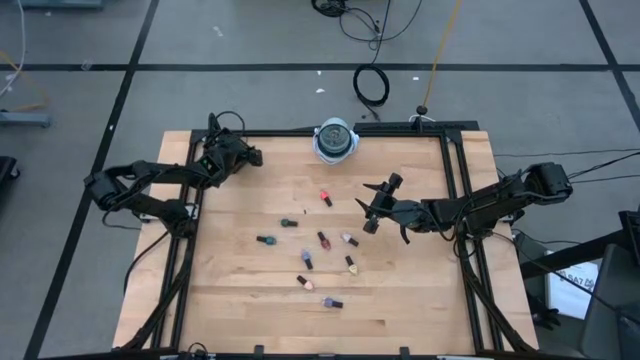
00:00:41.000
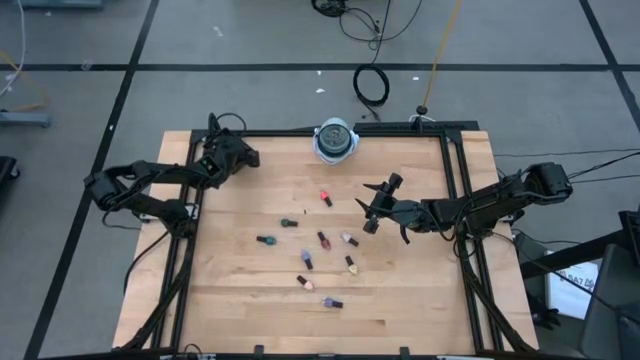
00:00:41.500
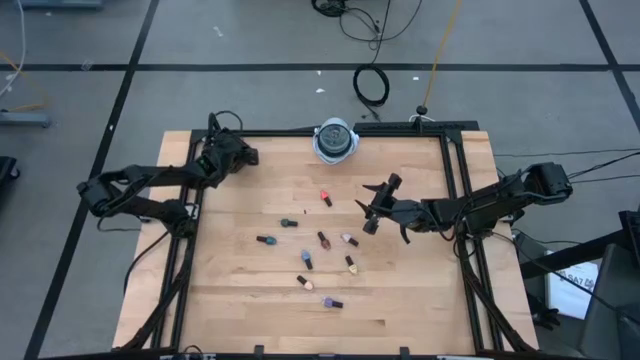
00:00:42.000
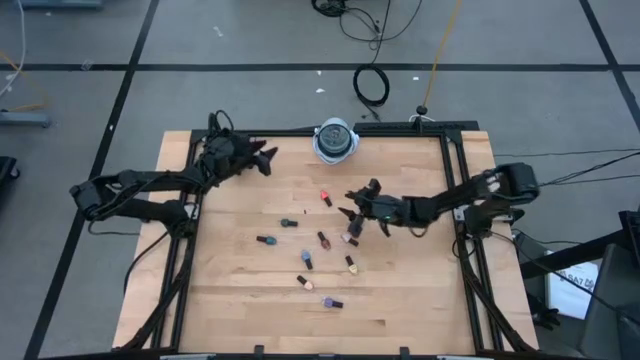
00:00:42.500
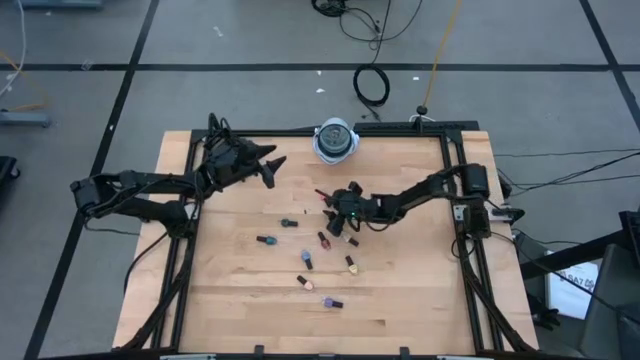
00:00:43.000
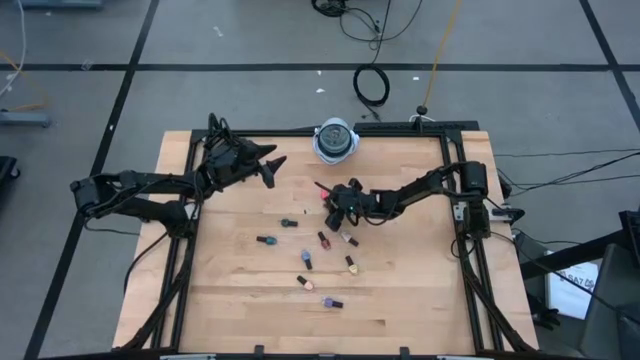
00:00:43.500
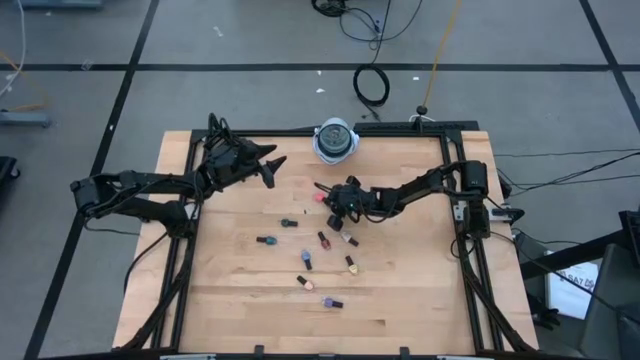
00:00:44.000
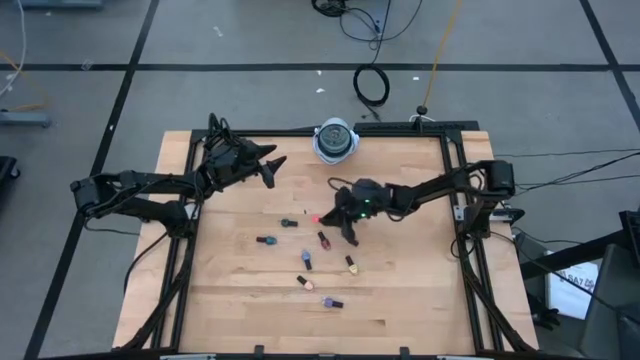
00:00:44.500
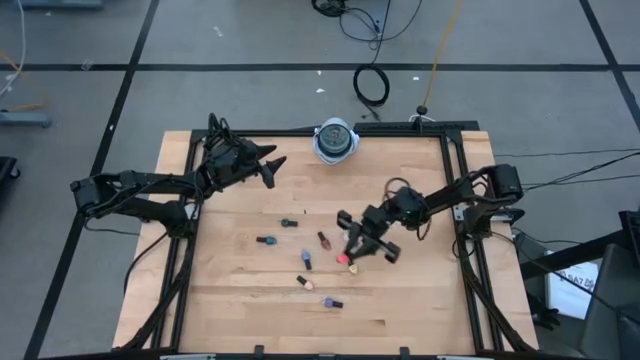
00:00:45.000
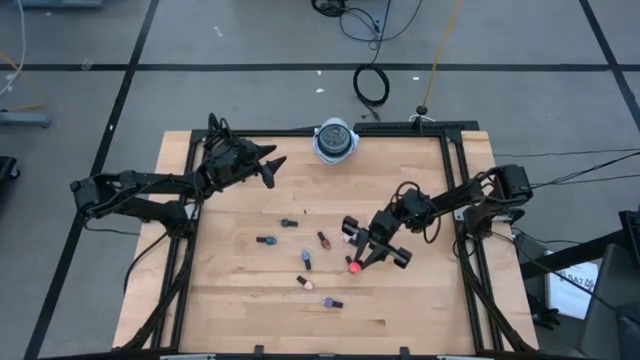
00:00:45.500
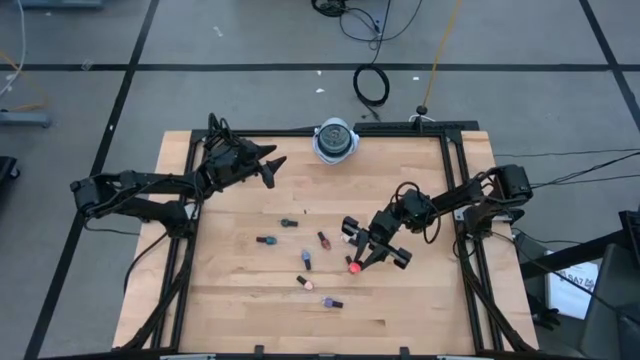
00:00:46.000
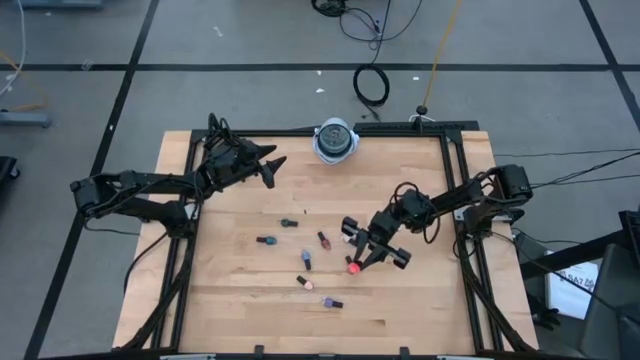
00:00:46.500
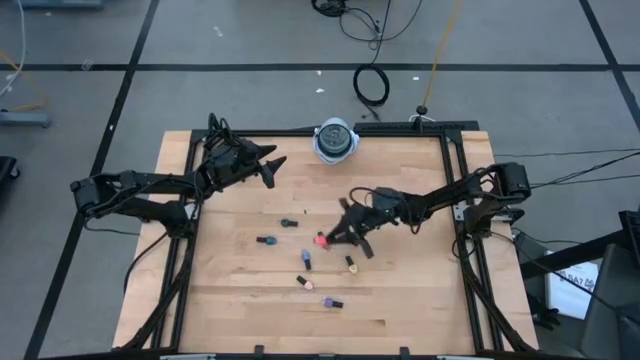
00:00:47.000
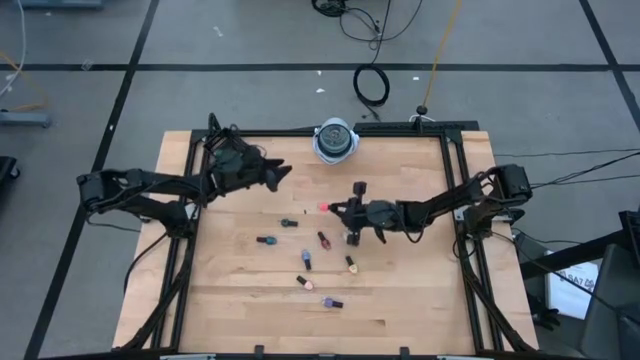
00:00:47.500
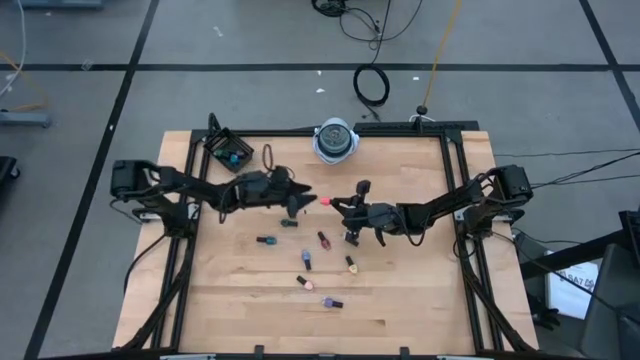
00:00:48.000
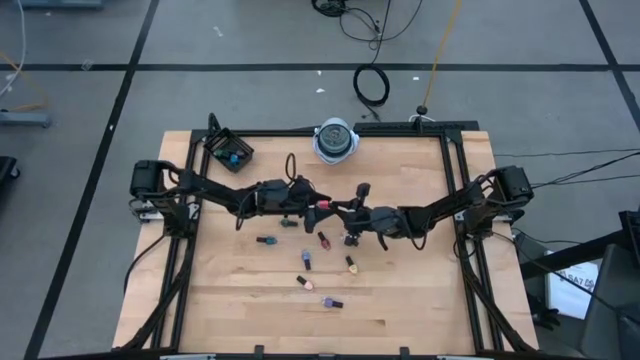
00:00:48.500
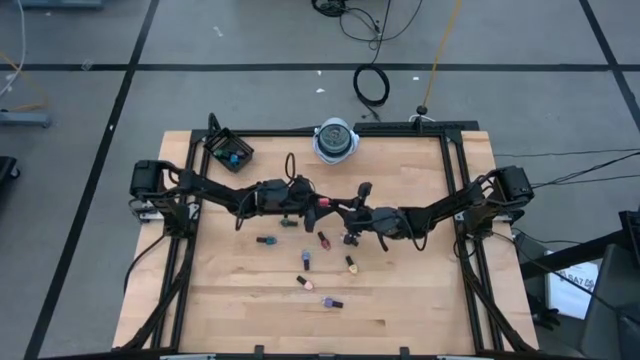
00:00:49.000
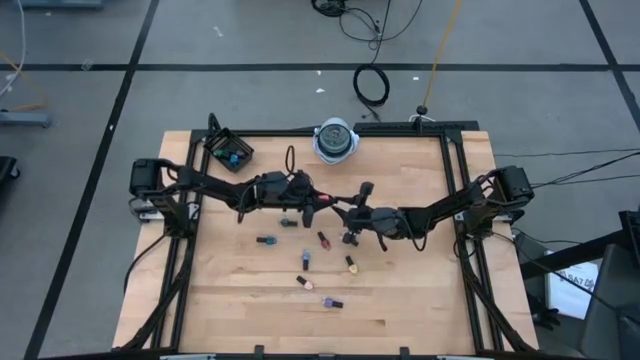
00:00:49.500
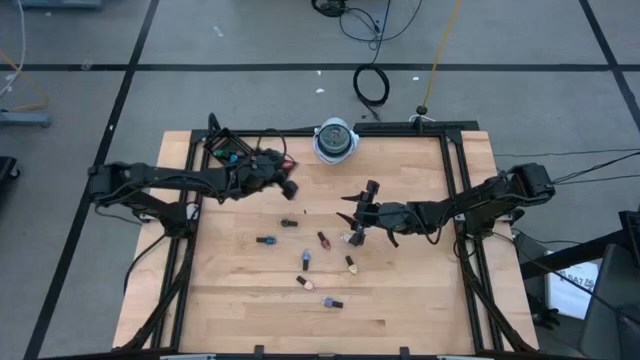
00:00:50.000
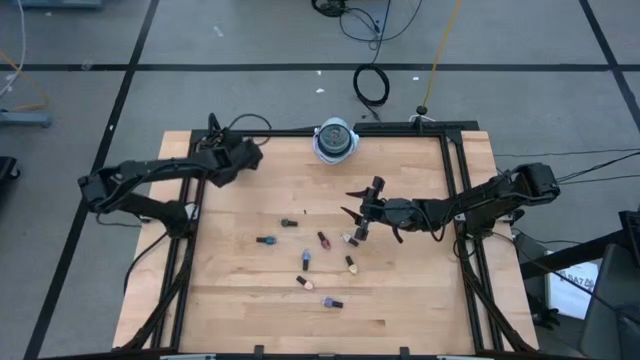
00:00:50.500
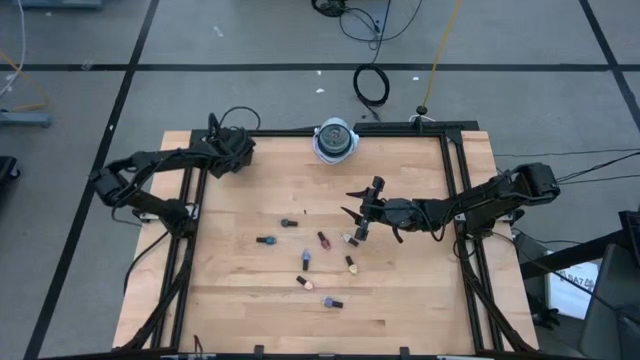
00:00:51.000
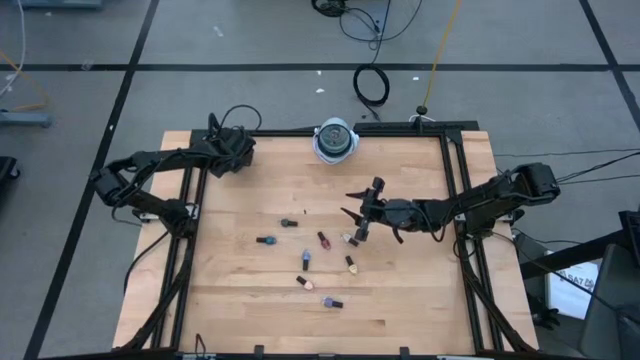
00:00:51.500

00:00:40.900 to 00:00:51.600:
Task: Pick & Place Nail Polish
Put the pink nail polish bottle into the black bin

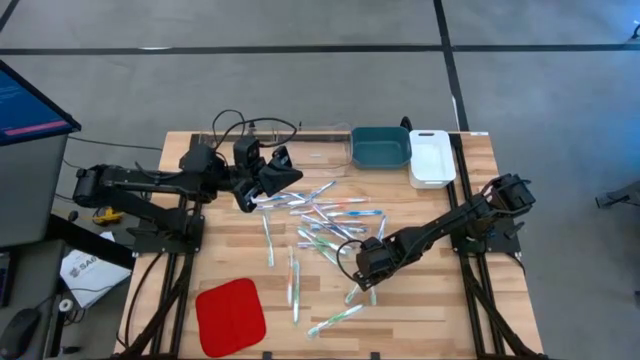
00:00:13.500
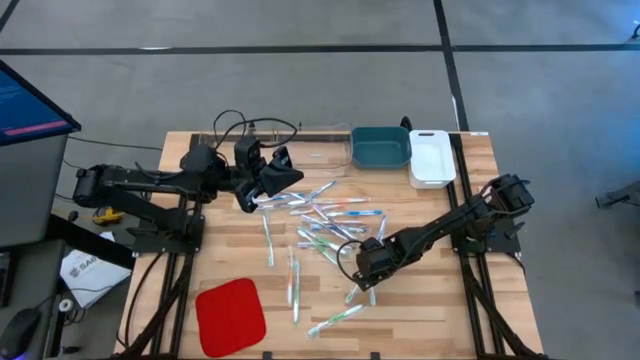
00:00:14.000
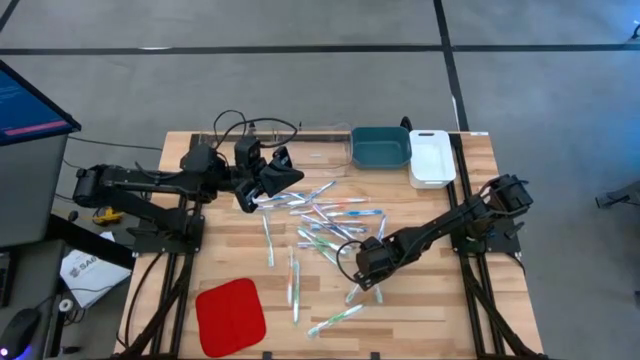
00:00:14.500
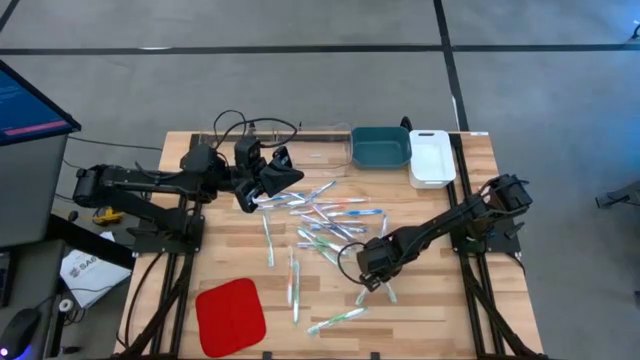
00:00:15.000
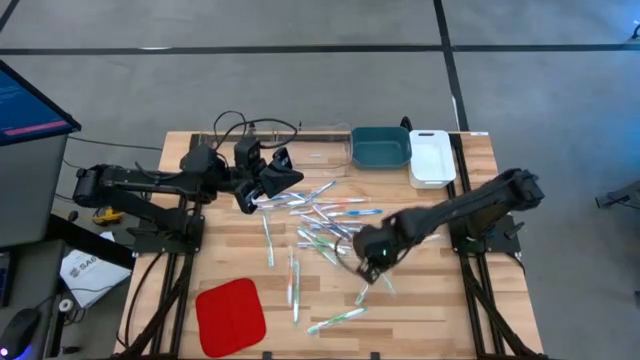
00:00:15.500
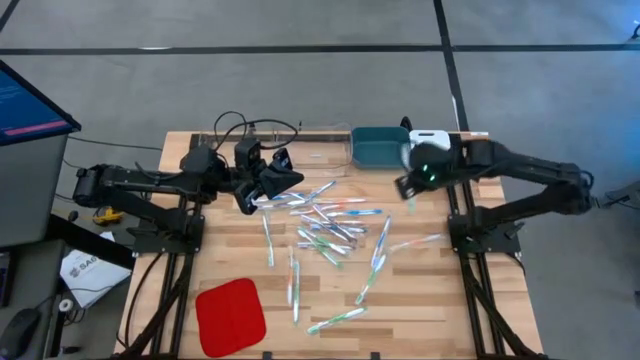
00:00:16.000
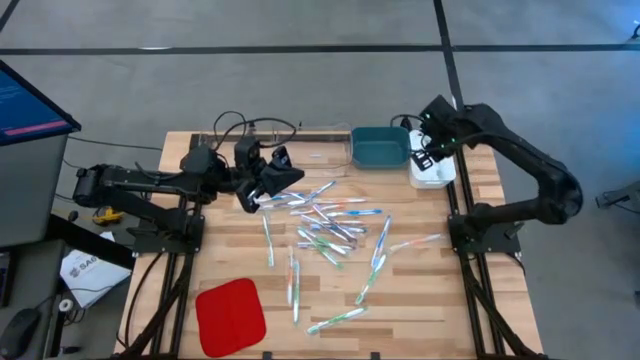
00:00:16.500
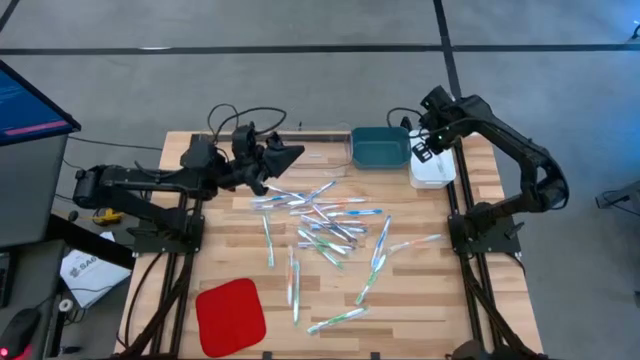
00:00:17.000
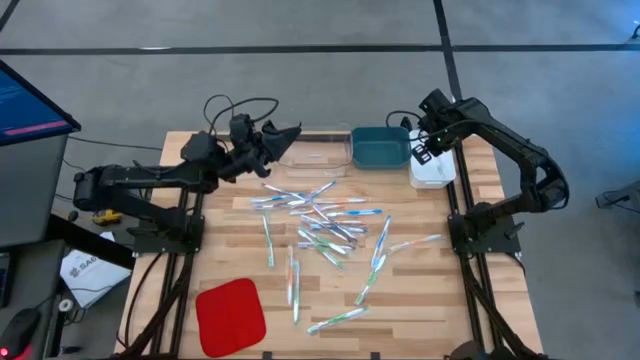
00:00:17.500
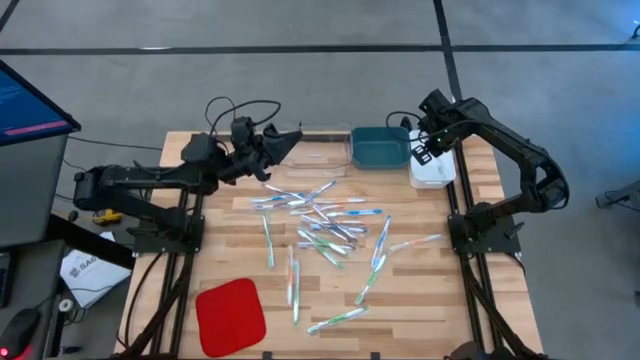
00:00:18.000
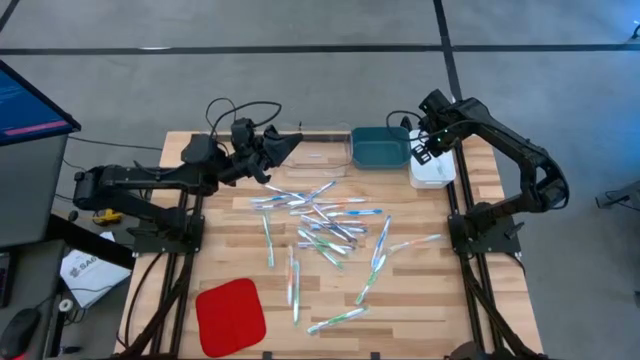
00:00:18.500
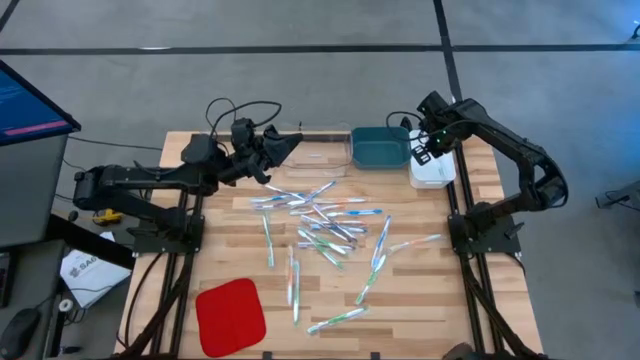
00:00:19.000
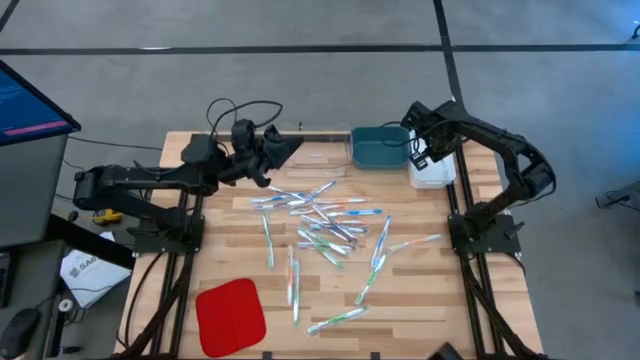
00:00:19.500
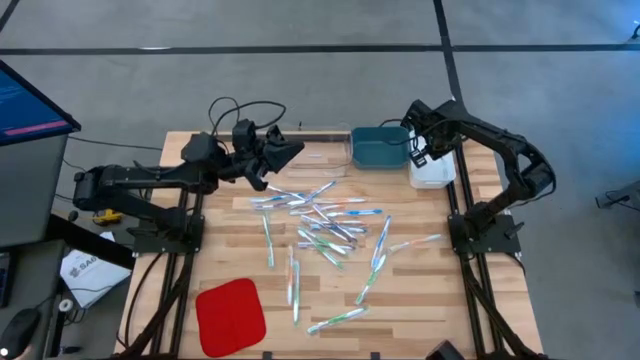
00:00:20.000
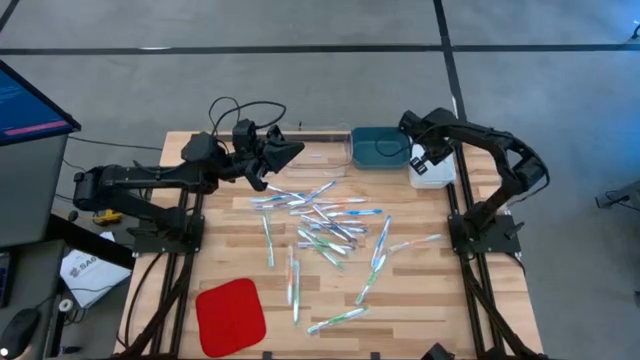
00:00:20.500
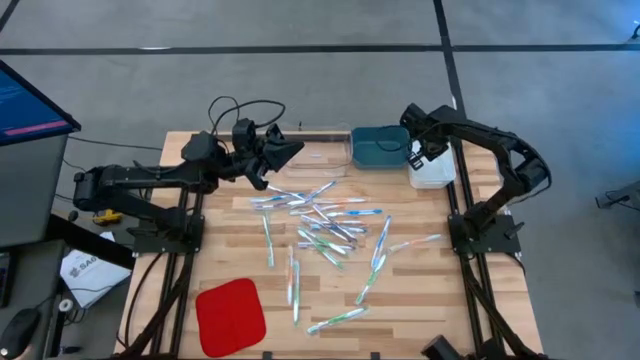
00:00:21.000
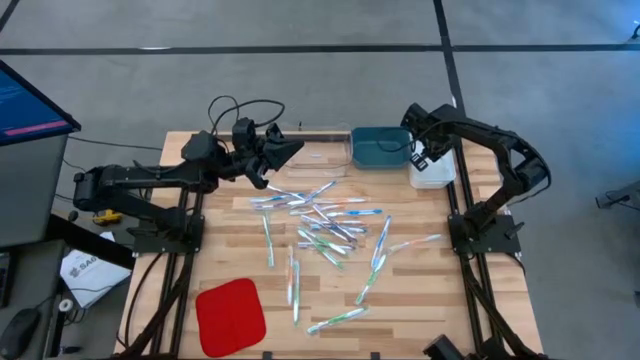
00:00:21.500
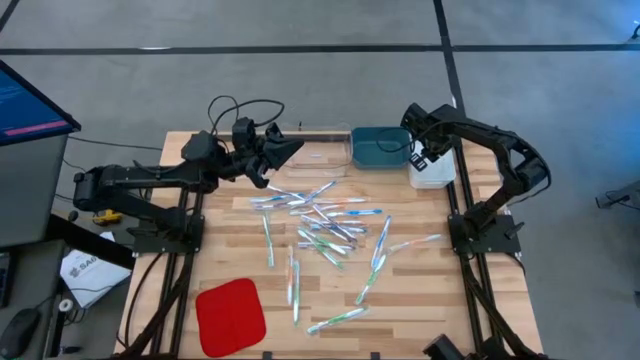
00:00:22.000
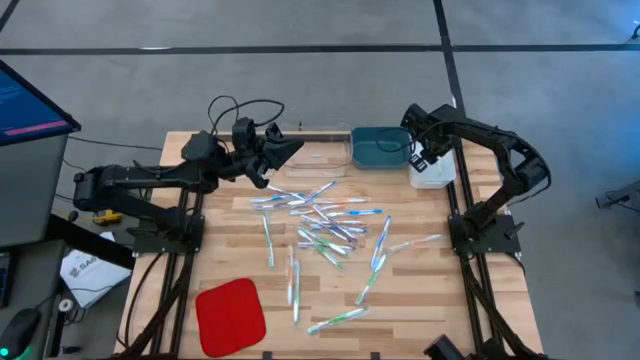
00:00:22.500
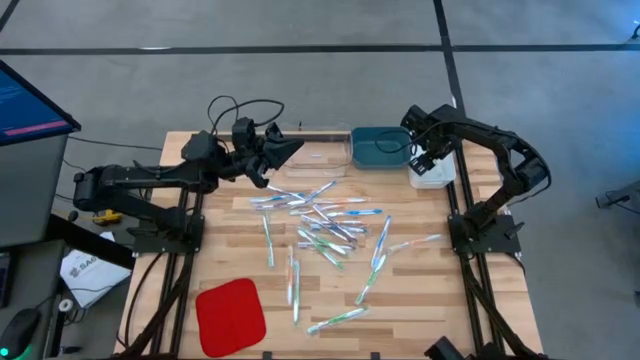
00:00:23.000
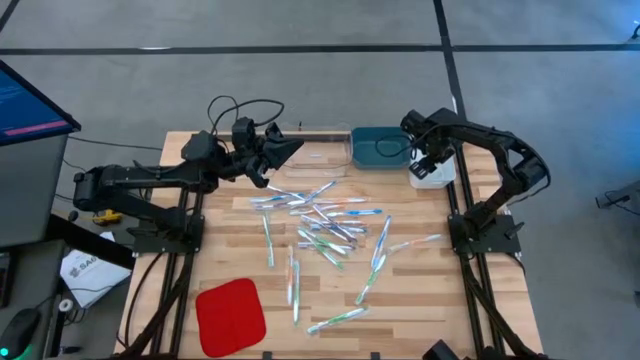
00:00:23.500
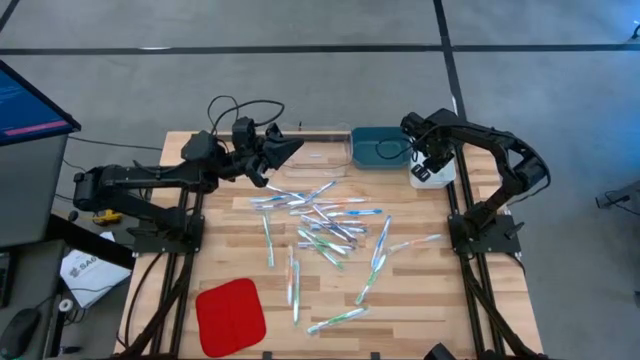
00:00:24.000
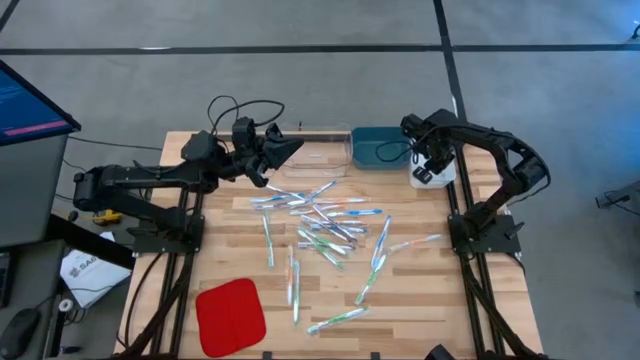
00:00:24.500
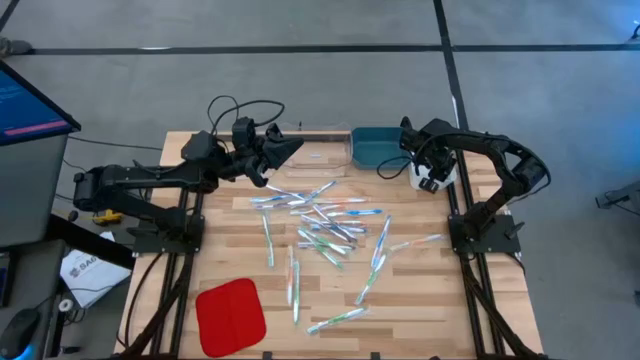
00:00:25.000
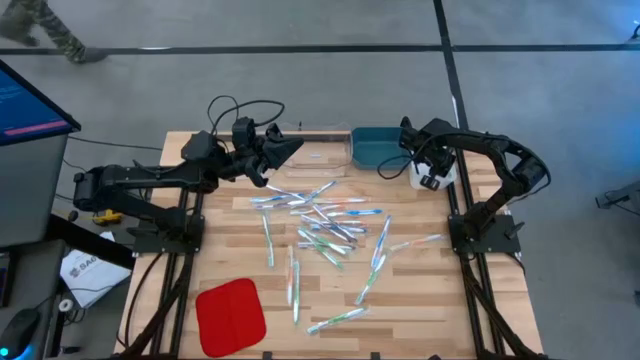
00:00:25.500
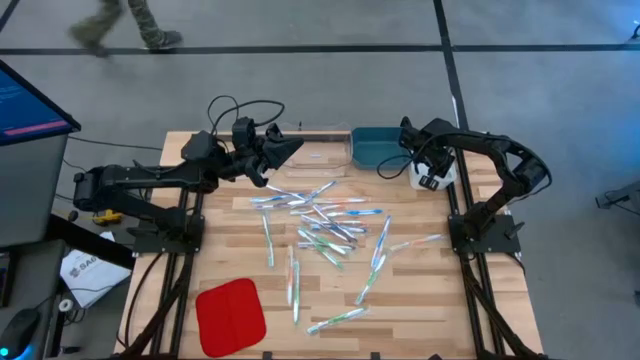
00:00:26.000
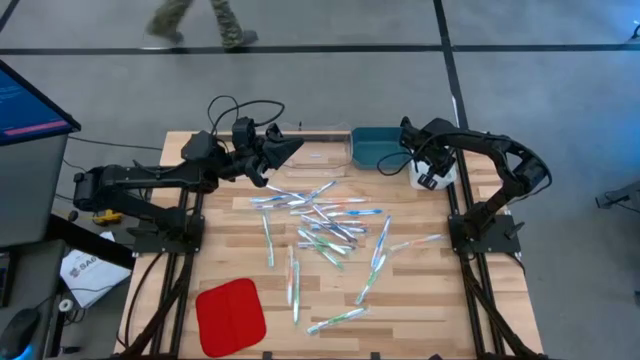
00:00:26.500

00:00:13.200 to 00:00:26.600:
Task: Pick & Place Toothbrushes
Put the green toothbrush into the white bin
